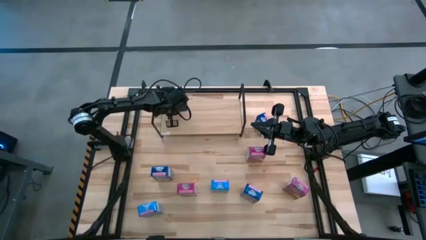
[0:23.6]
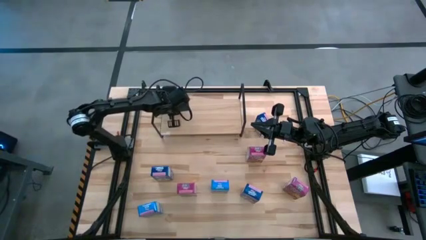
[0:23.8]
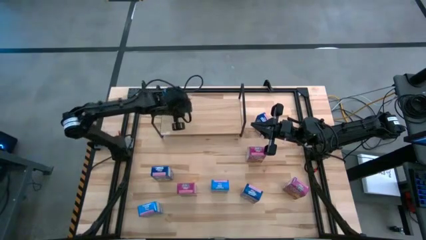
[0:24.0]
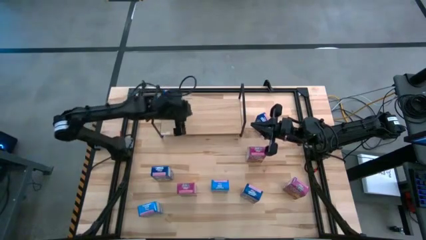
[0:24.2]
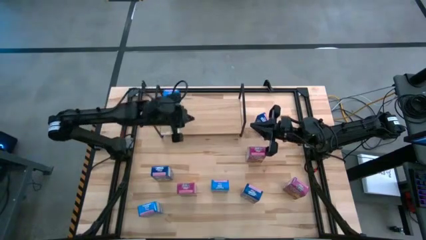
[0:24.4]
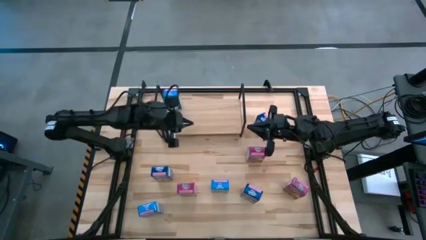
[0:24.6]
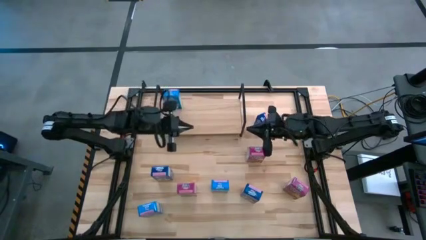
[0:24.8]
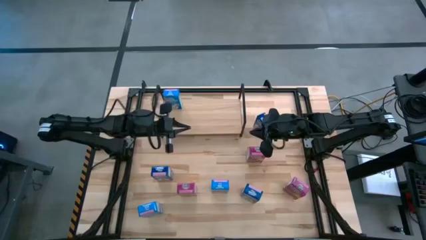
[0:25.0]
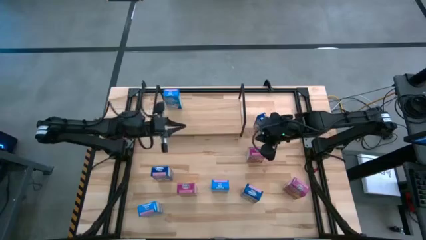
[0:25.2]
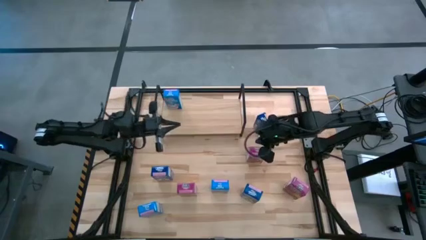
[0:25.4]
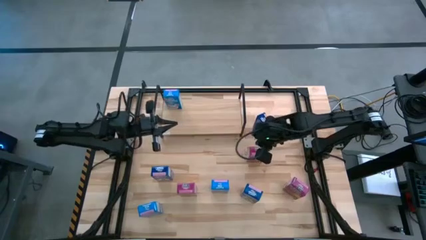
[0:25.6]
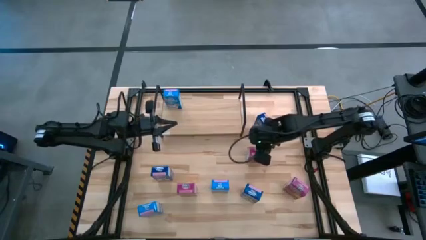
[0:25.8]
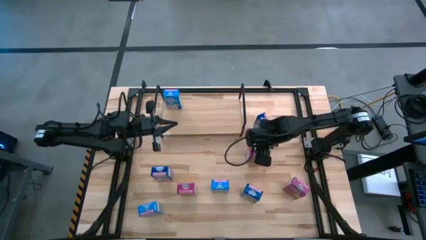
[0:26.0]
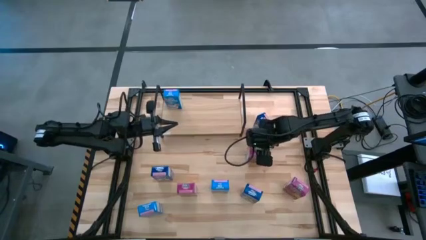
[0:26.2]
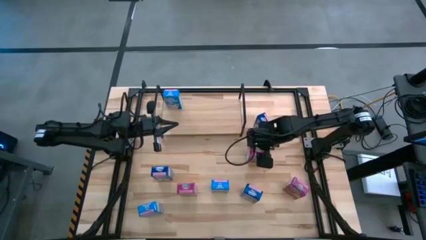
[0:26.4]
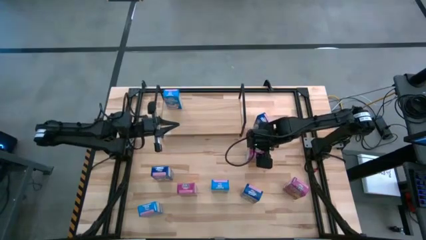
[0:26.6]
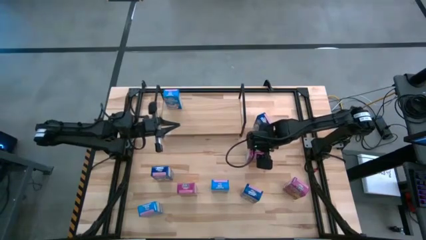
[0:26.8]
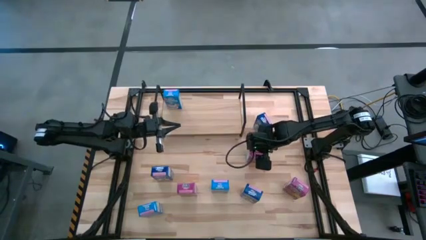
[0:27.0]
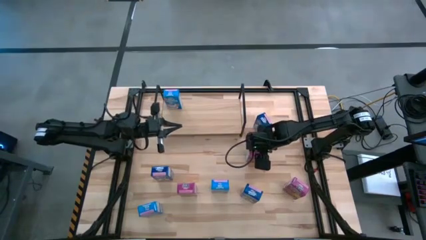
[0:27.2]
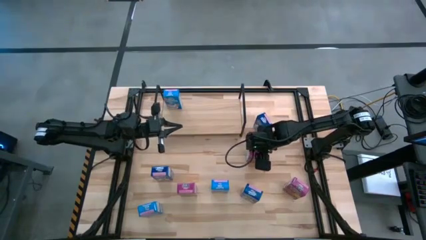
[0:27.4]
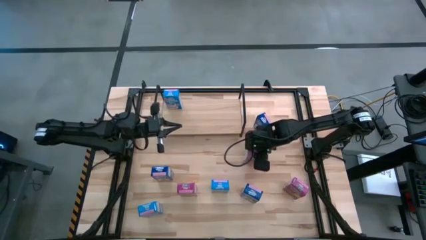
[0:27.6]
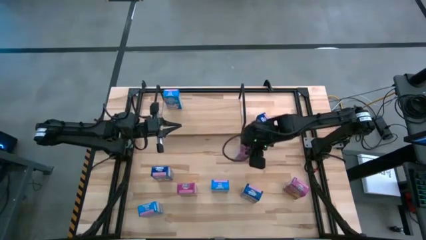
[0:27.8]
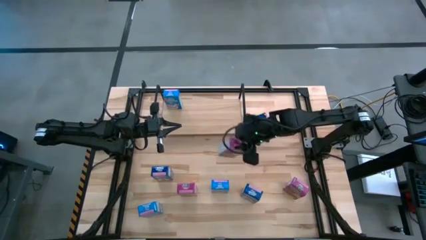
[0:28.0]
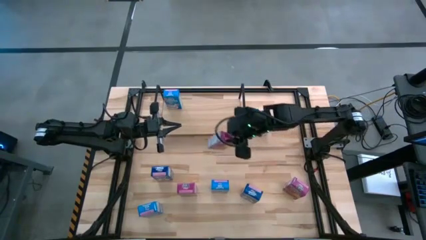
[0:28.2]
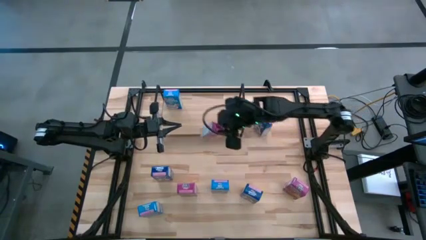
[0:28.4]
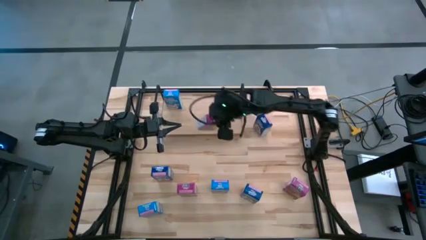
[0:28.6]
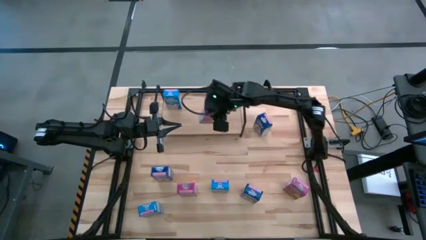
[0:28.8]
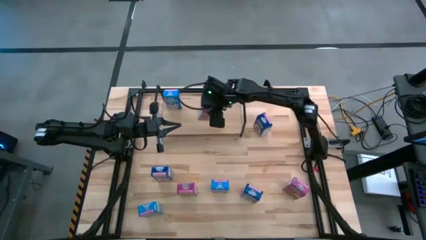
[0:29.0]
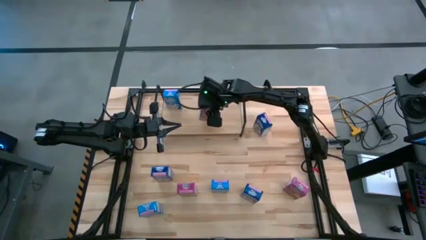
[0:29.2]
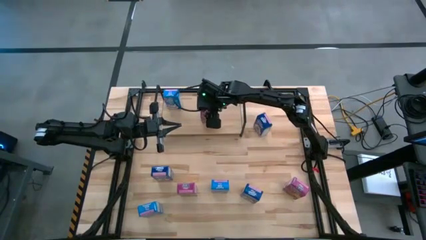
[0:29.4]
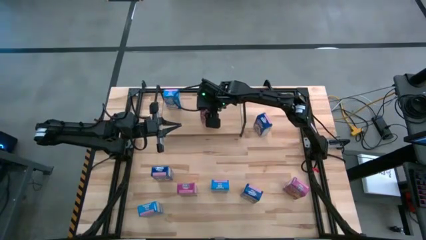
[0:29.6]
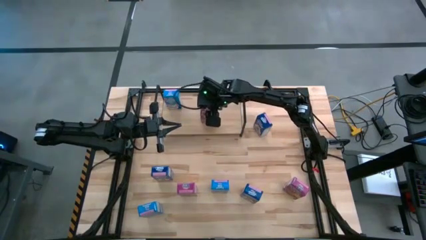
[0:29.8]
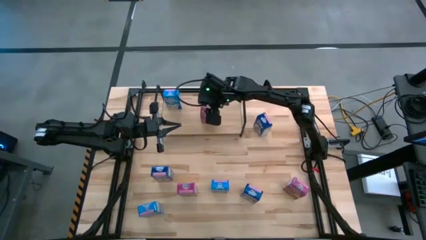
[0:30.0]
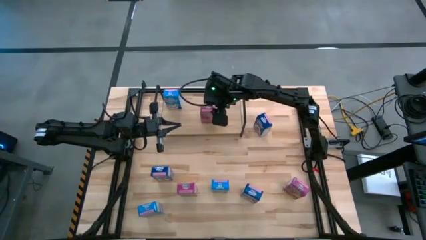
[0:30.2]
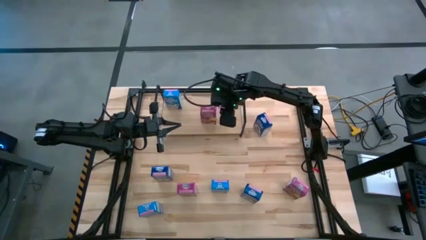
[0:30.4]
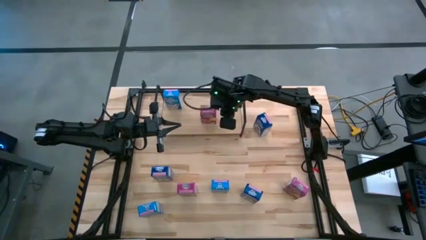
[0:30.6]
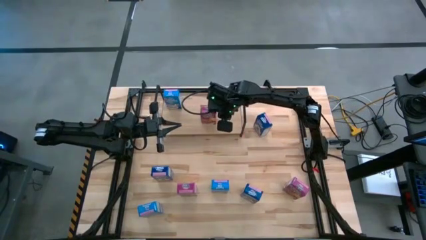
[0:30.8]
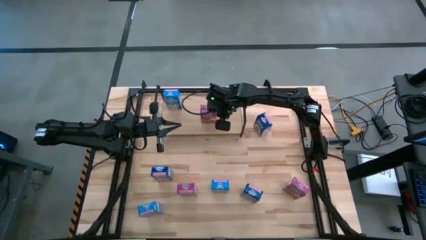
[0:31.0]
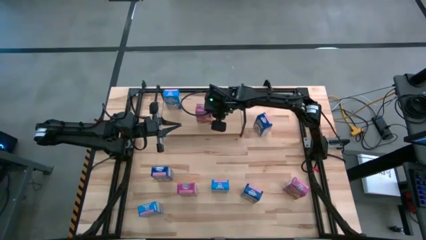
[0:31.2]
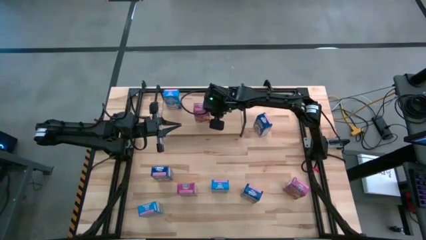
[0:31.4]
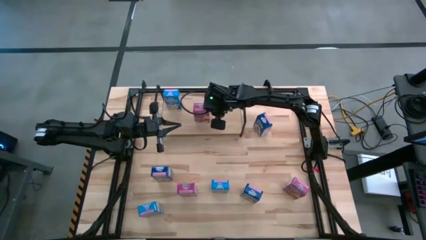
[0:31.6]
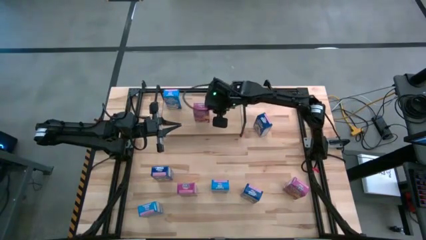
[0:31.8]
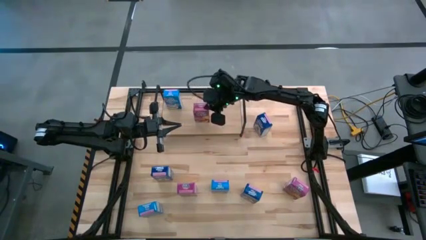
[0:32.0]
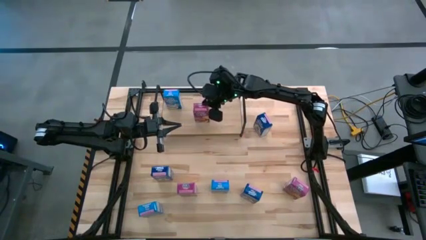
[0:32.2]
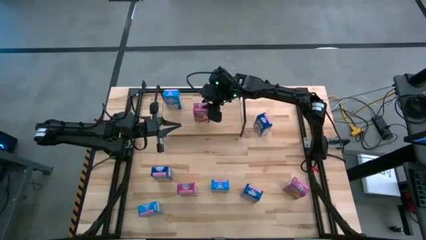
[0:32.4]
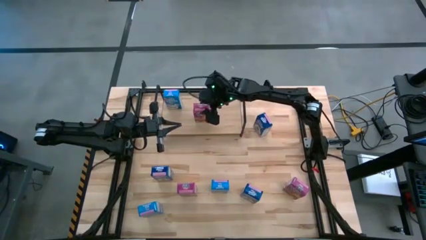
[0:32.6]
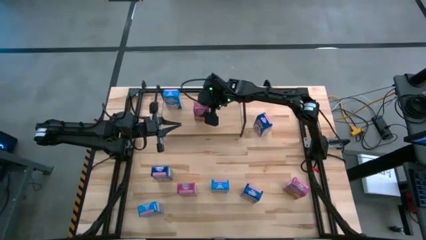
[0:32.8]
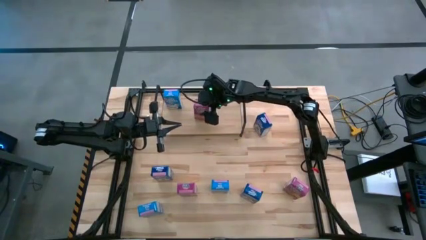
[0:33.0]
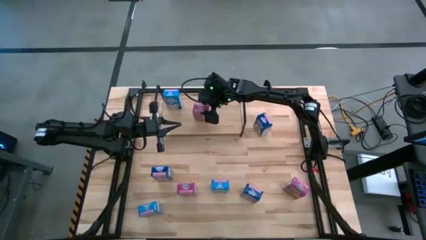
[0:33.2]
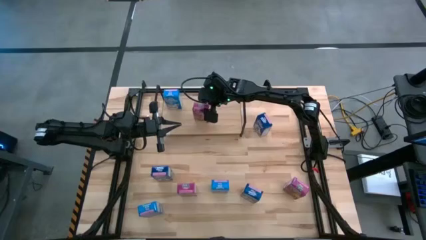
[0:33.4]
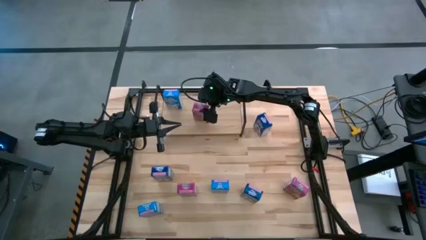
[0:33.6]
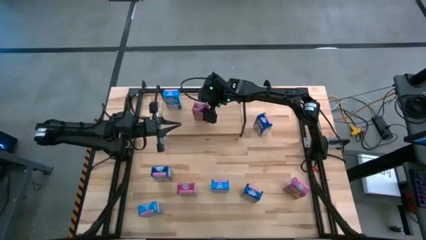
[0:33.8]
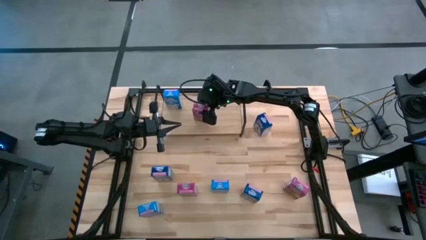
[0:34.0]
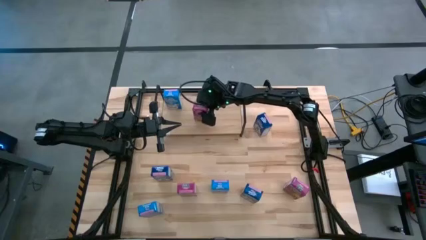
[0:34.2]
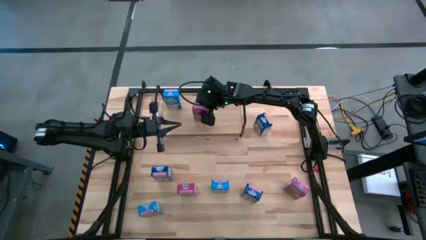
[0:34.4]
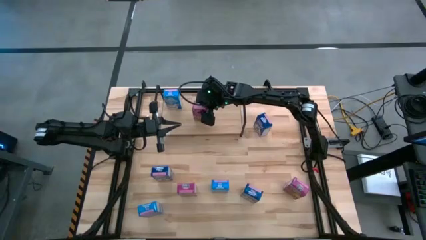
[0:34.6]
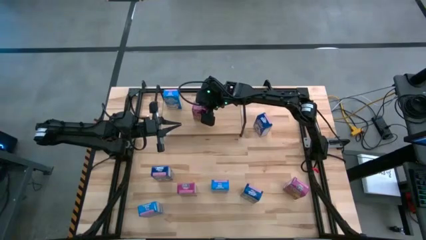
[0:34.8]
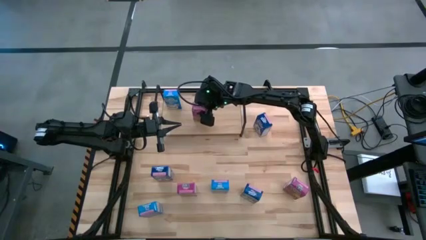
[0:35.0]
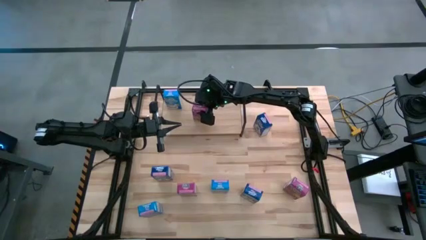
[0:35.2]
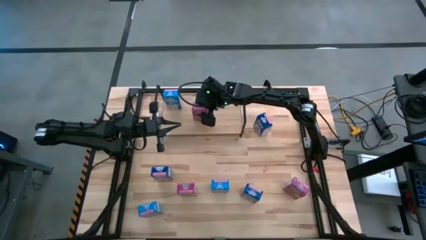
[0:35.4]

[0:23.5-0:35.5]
Task: Stack cereal on shelf
Put the top violet cereal box on the shelf

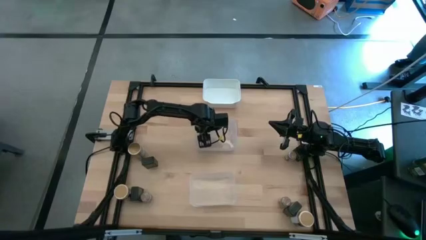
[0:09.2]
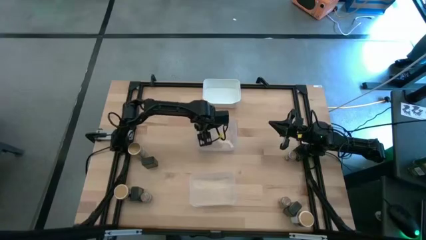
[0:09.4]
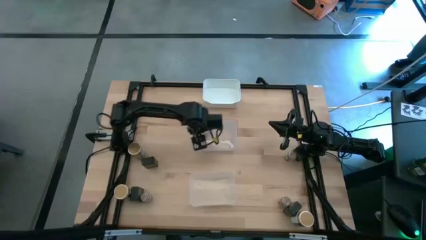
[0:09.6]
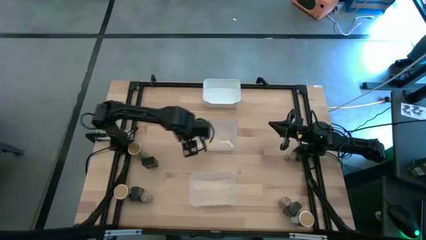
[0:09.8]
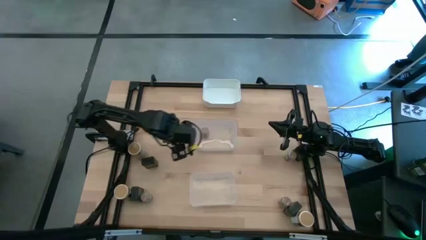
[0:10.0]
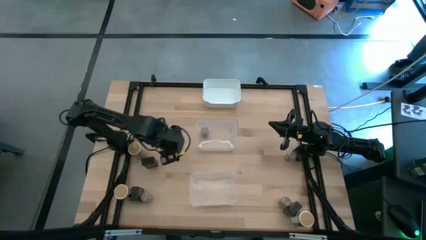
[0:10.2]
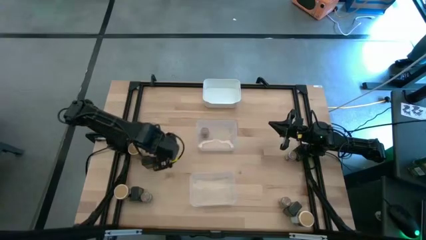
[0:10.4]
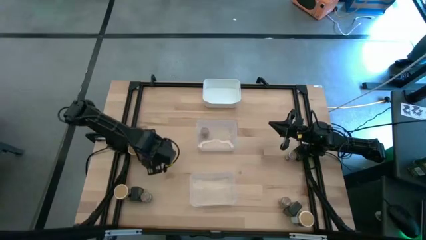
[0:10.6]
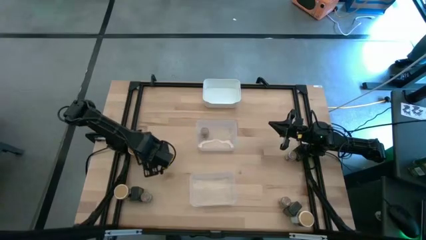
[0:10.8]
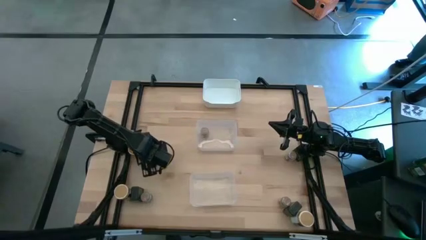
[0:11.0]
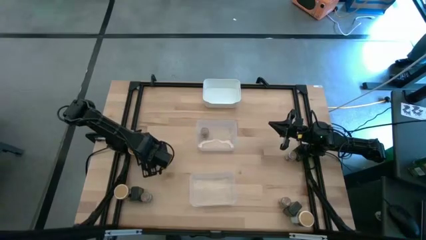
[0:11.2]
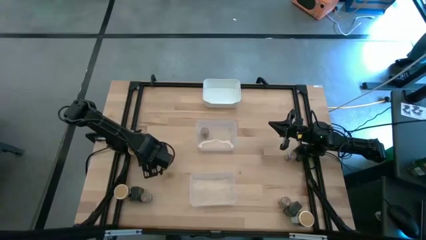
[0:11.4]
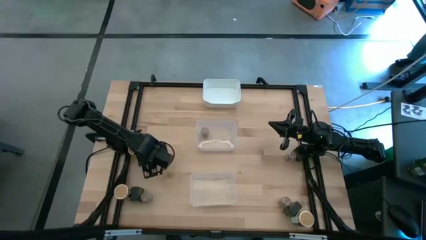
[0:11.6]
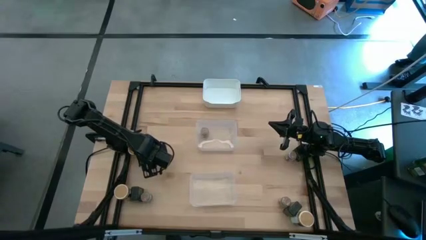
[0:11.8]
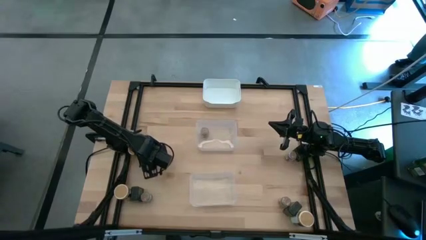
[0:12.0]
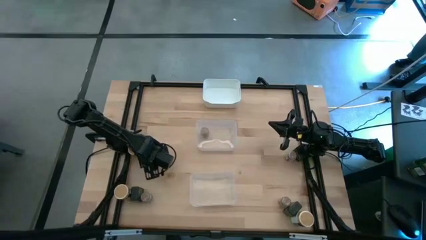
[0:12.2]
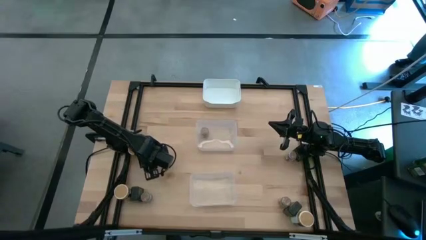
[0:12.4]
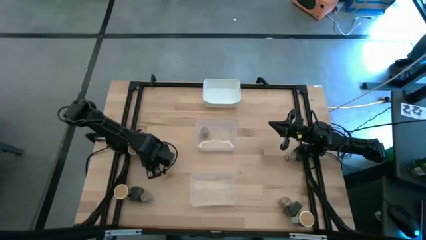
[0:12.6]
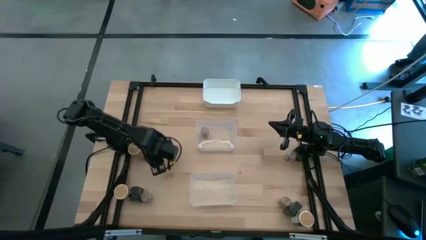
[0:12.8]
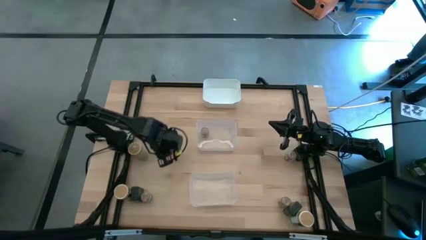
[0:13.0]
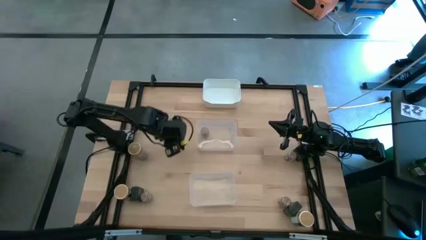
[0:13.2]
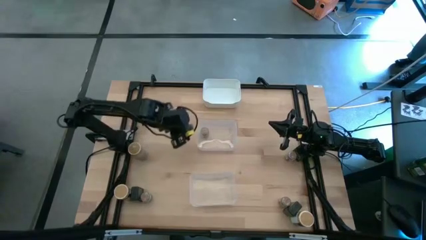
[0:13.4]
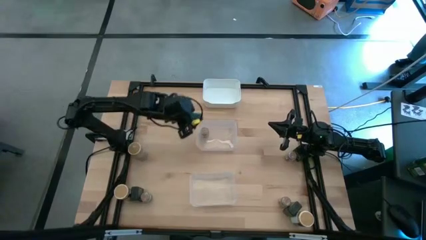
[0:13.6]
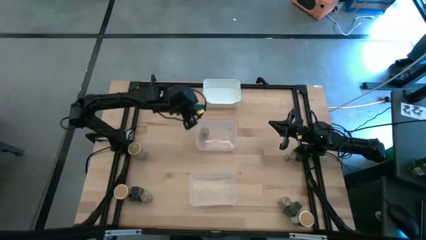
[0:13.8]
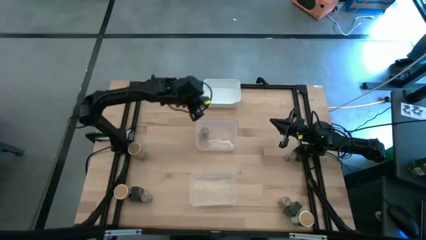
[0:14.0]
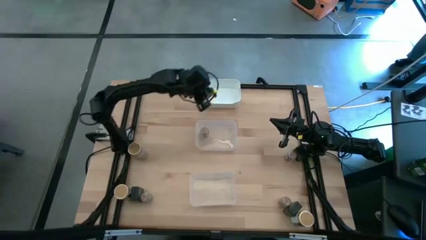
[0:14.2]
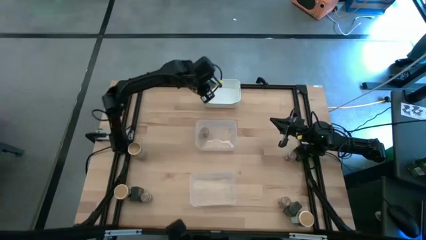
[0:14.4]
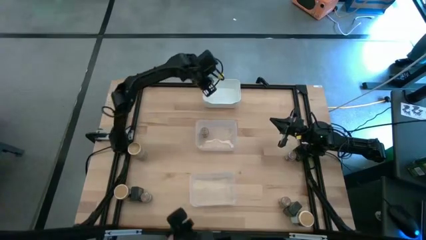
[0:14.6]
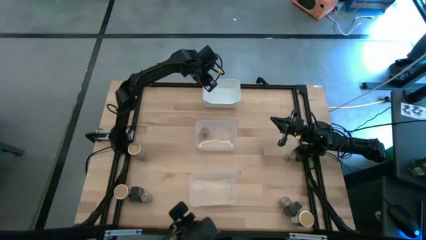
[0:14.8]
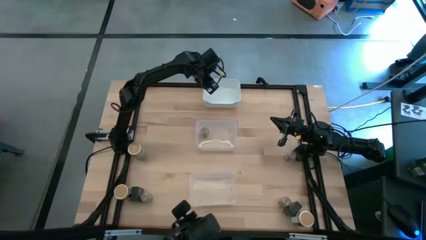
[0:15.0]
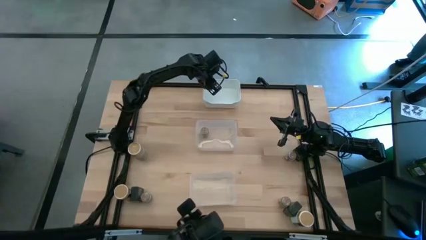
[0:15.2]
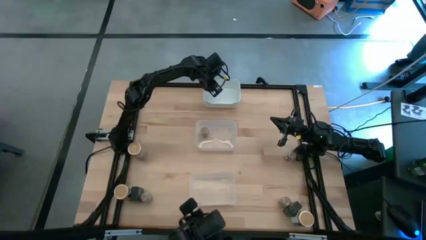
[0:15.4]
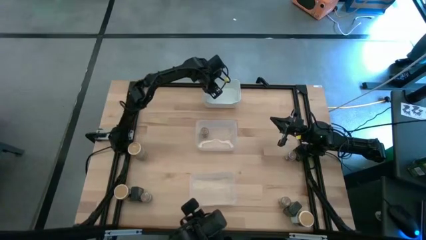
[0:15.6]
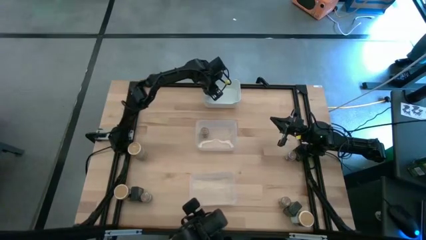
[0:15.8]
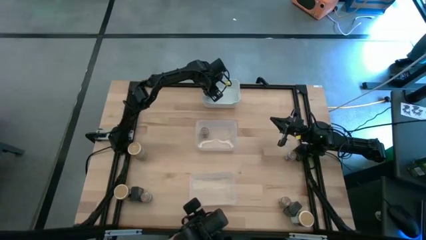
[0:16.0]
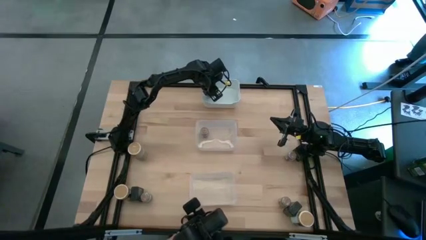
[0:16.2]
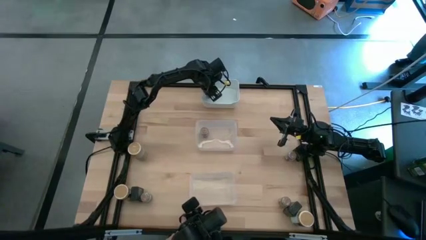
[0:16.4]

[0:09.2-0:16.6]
Task: Sort spices by type
Put the top left black seasoning can into the white bin
